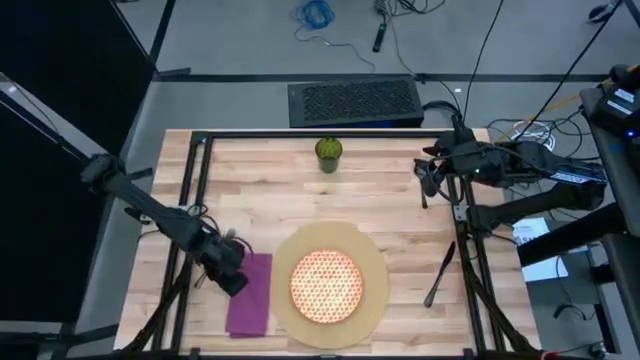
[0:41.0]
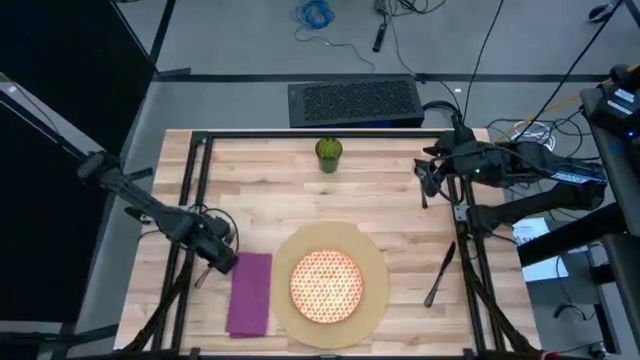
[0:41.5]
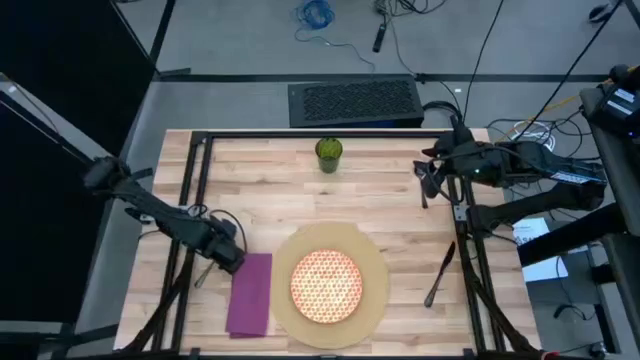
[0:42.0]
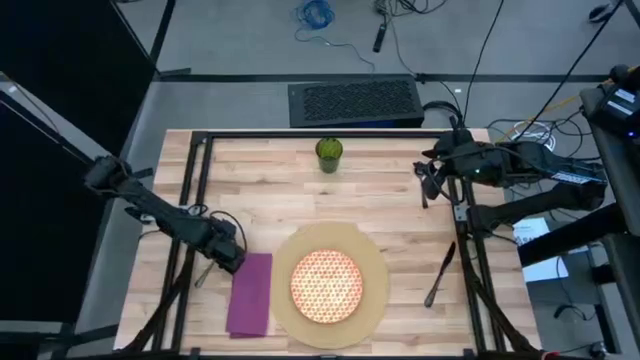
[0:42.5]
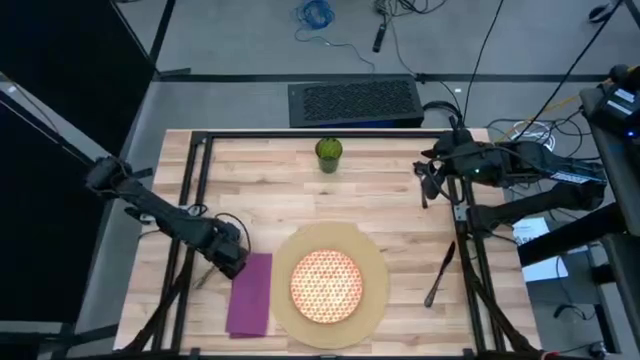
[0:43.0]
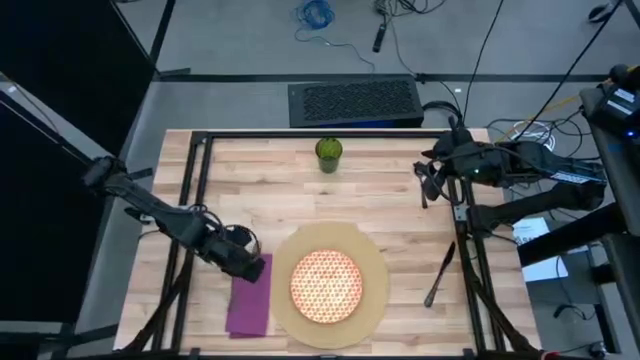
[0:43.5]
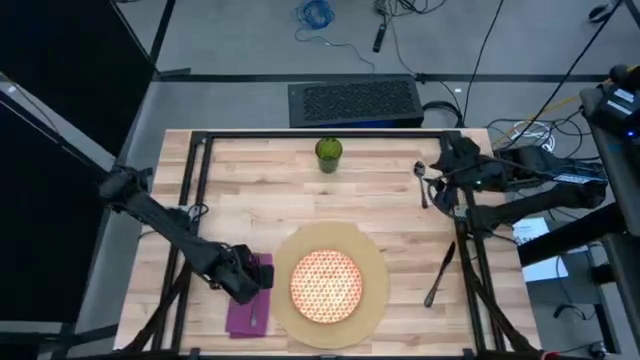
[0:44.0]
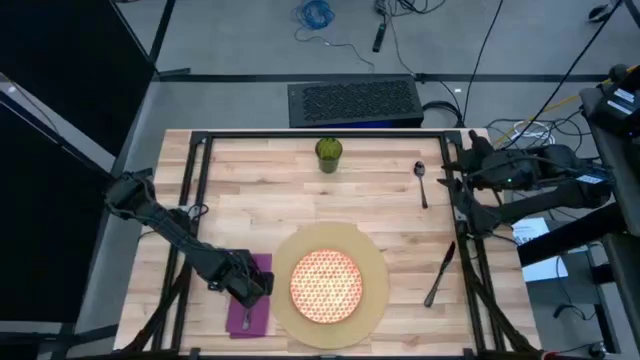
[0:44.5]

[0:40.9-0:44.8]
Task: Set table place
Put the black fork on top of the purple napkin

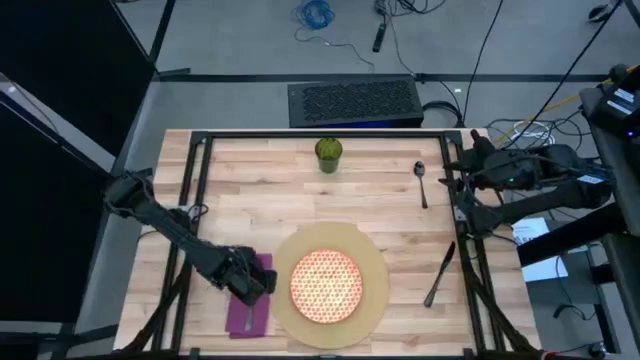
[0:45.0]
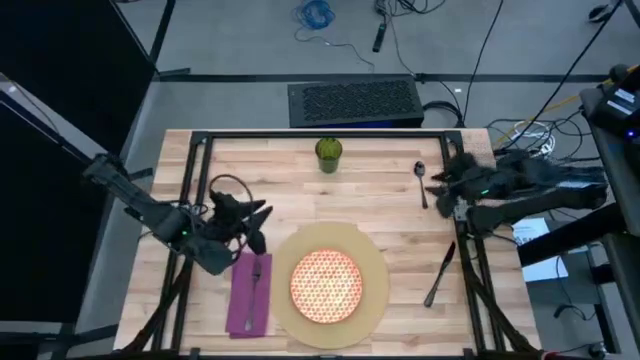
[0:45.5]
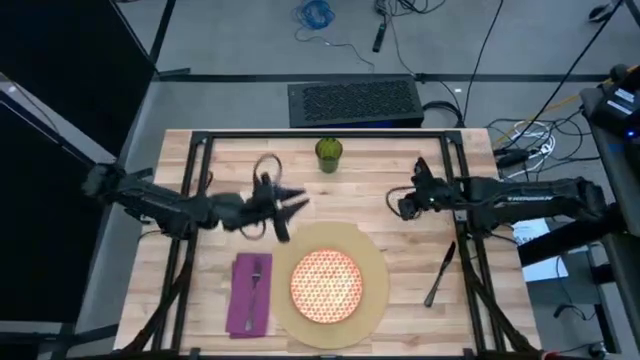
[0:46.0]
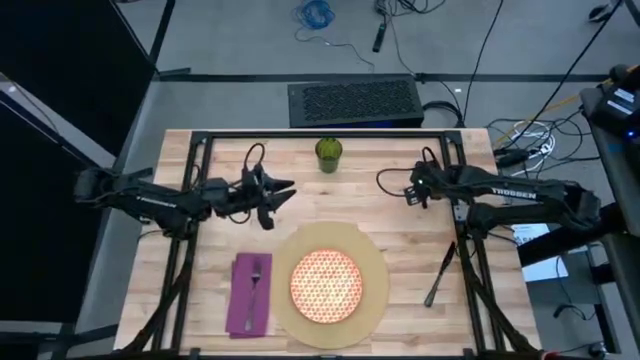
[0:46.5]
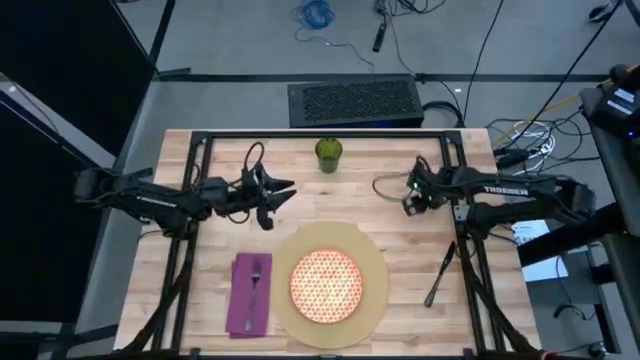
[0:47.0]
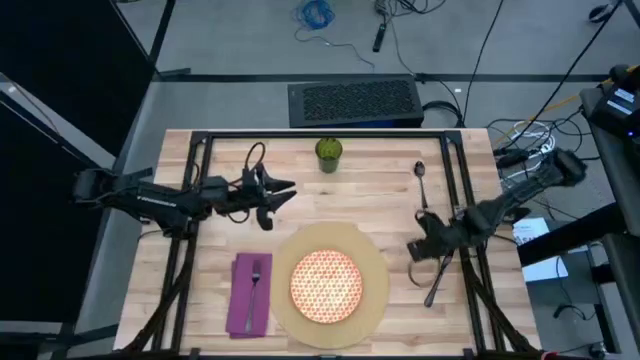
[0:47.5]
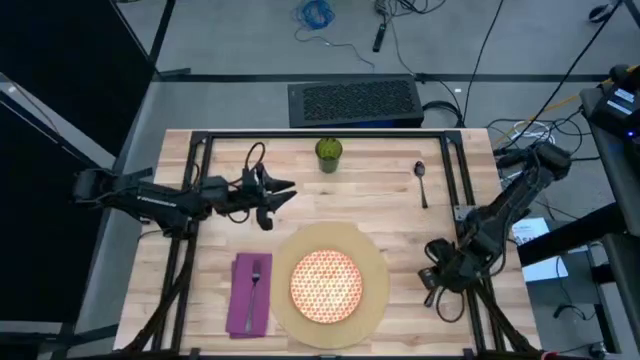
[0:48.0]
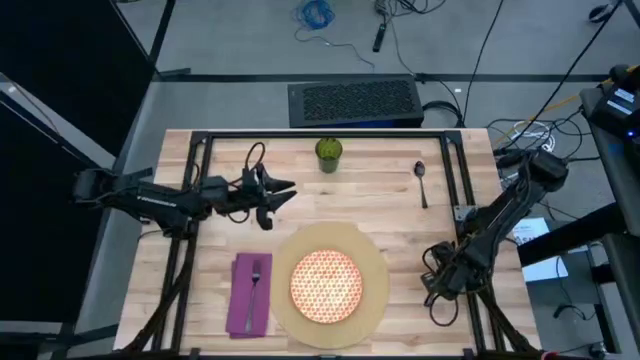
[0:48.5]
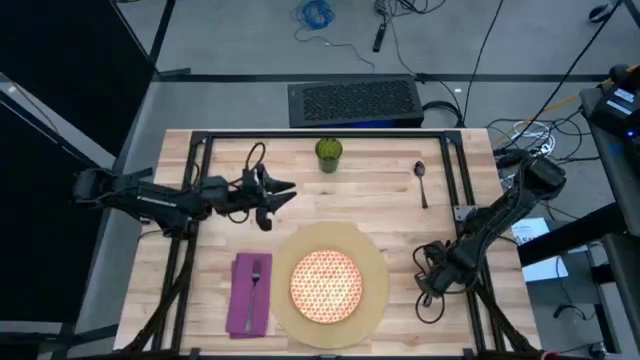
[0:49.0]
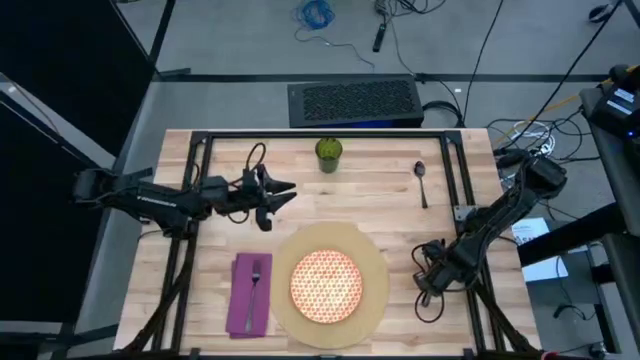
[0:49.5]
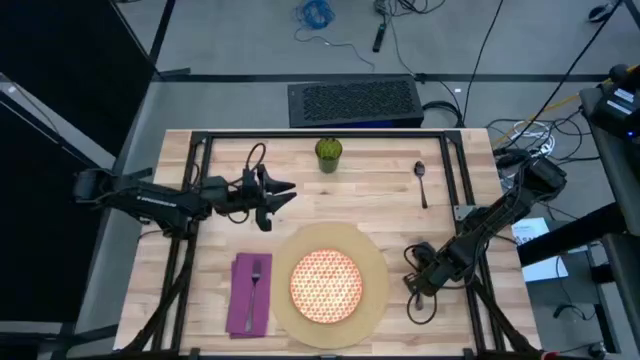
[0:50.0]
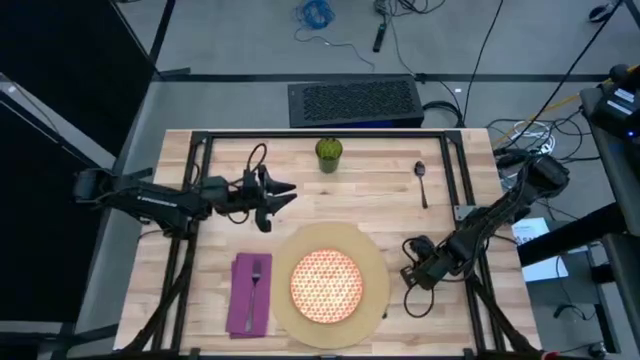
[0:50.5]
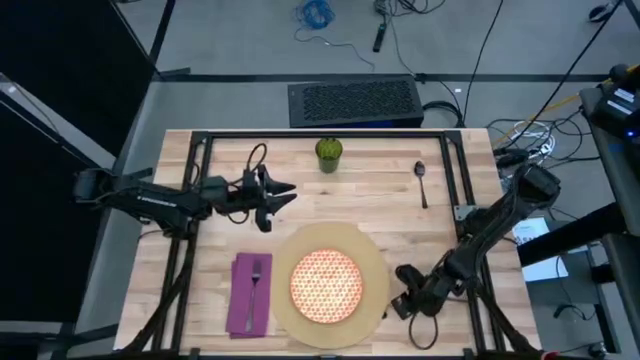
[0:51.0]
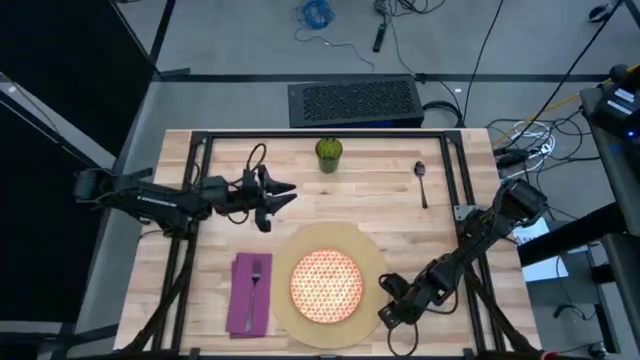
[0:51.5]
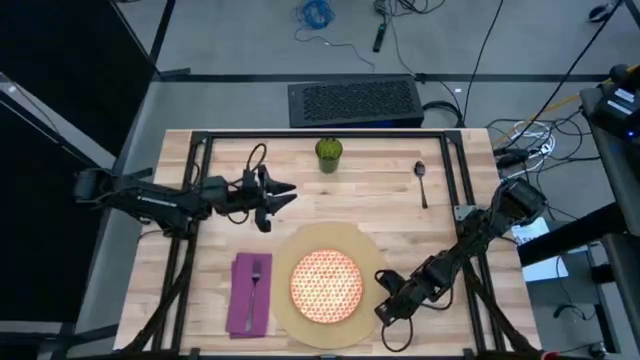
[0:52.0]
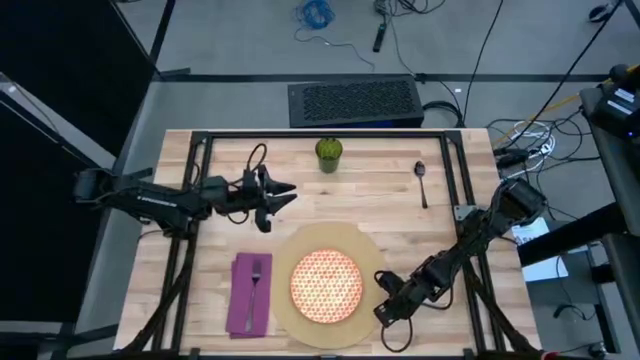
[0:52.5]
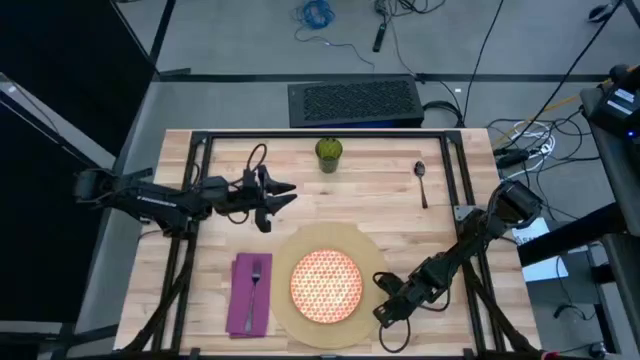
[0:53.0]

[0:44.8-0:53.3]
Move the black knife to the right of the brown placemat

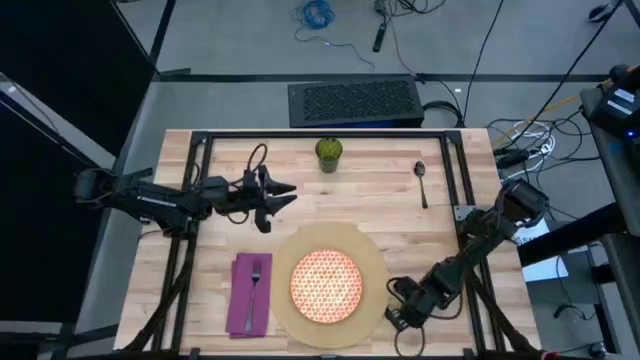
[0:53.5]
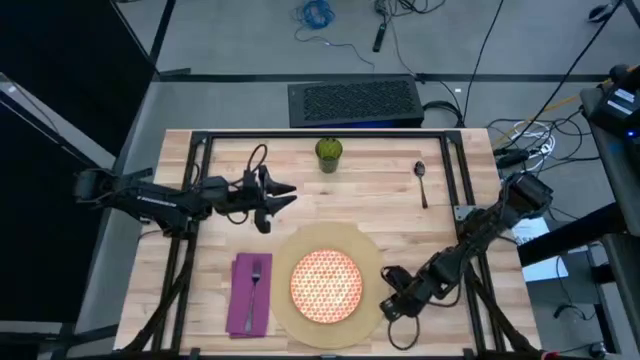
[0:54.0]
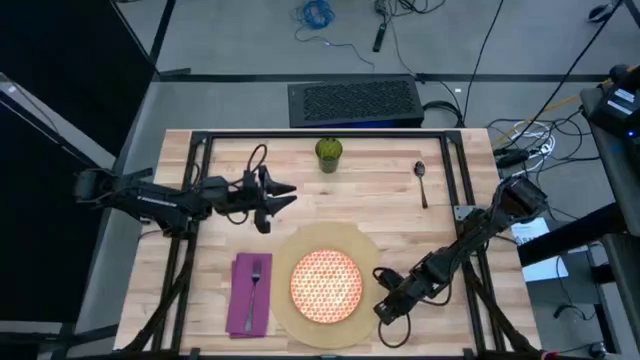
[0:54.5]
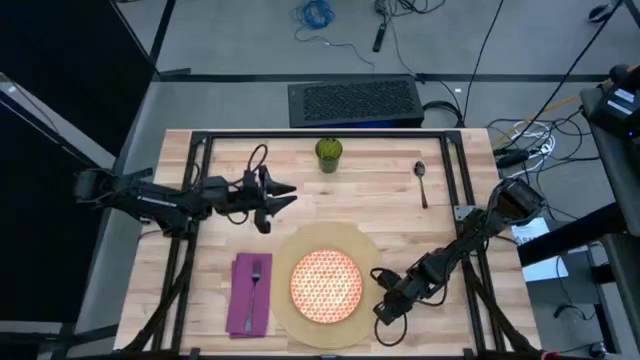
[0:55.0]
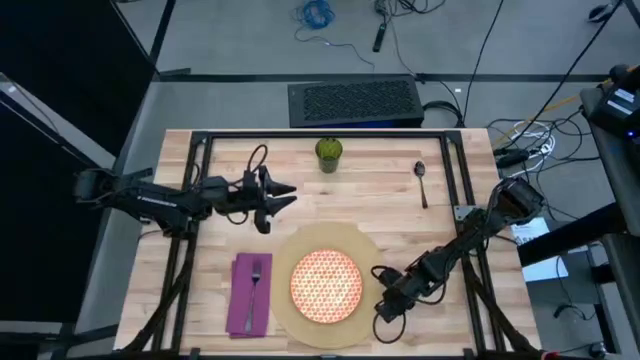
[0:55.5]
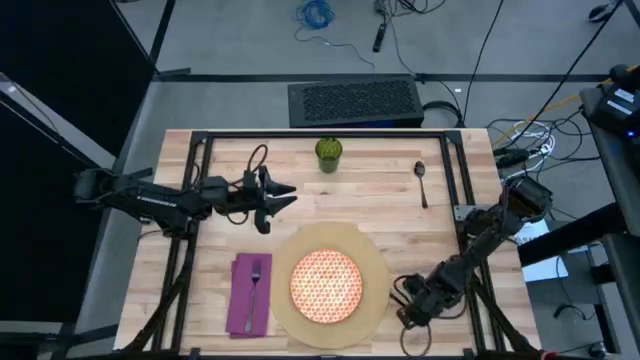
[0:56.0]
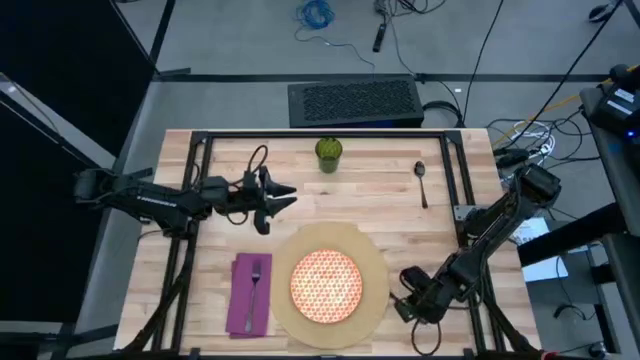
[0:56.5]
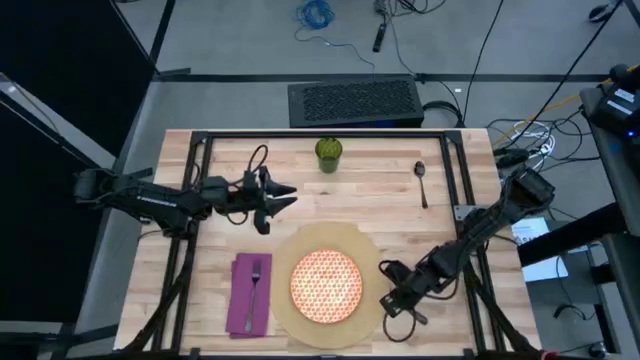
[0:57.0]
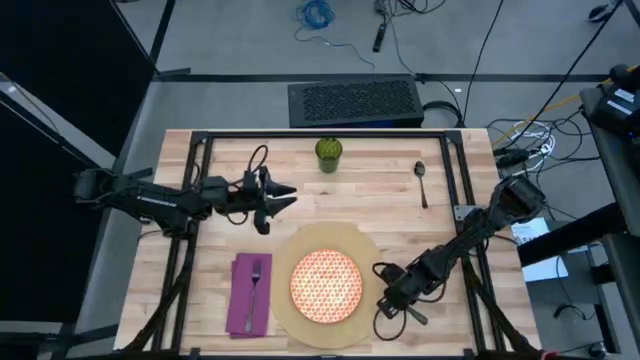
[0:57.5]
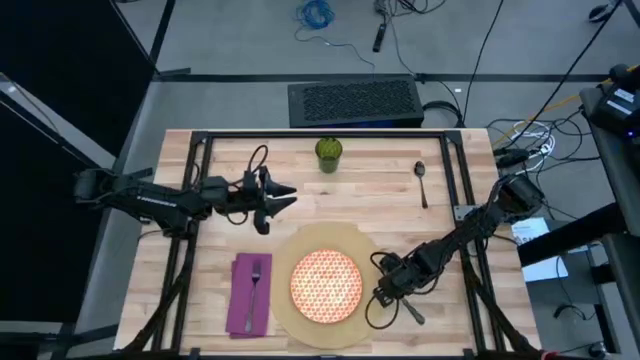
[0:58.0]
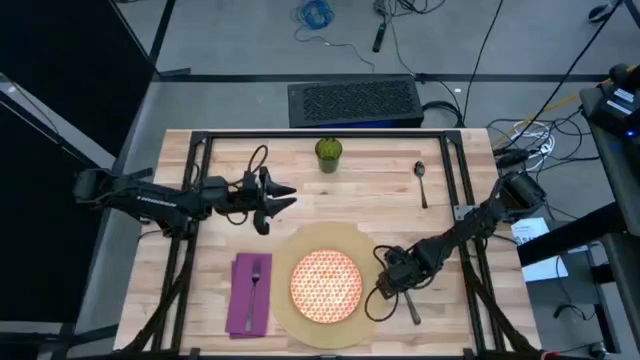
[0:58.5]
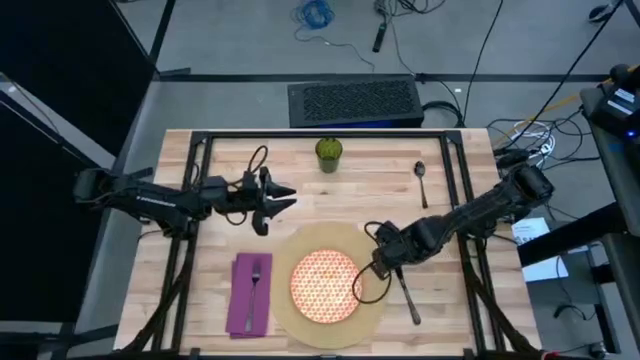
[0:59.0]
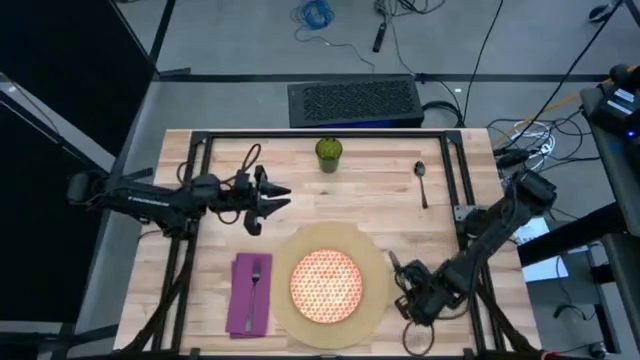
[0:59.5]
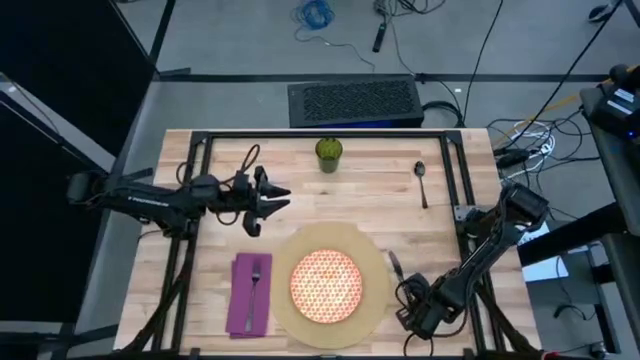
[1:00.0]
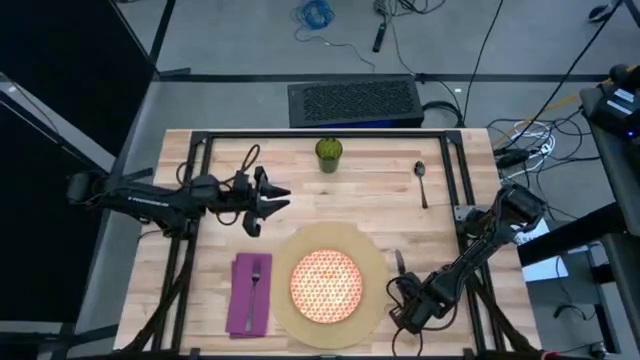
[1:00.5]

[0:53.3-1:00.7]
Move the black knife to the right of the brown placemat

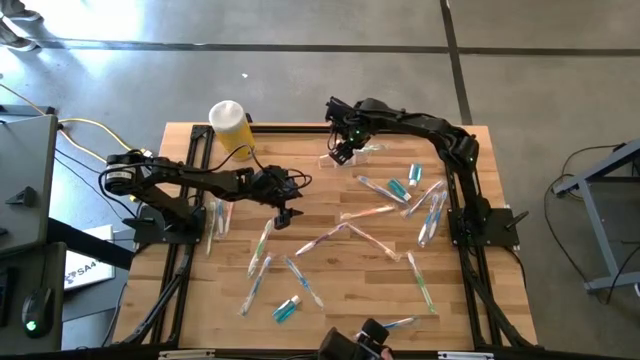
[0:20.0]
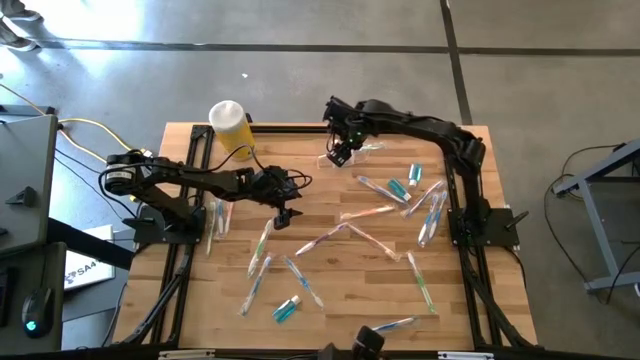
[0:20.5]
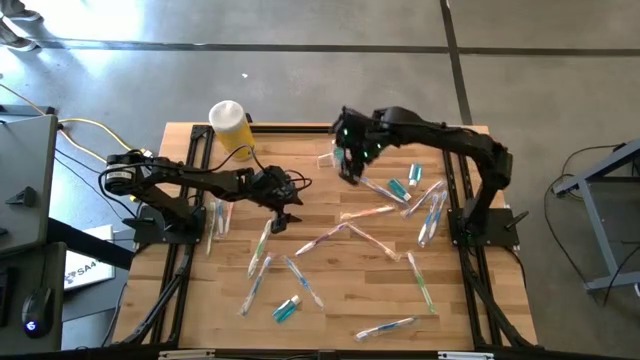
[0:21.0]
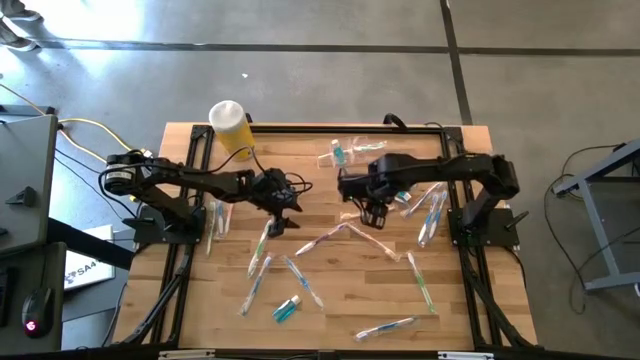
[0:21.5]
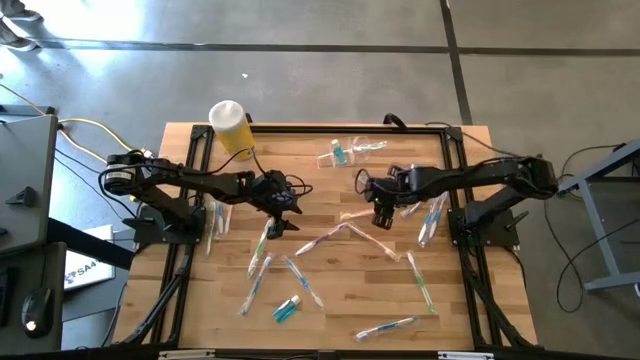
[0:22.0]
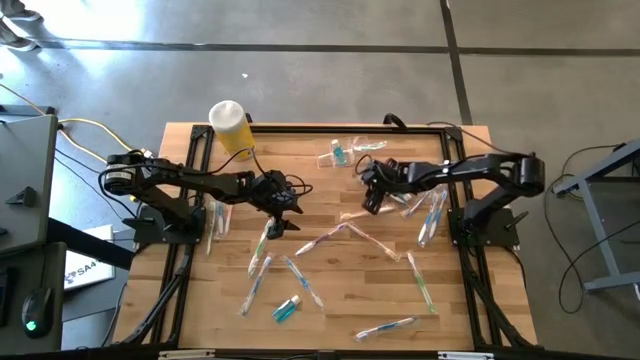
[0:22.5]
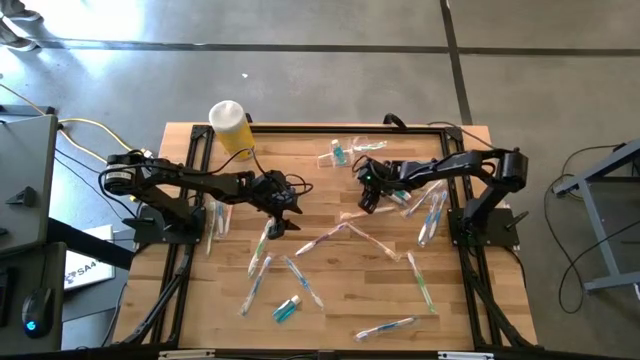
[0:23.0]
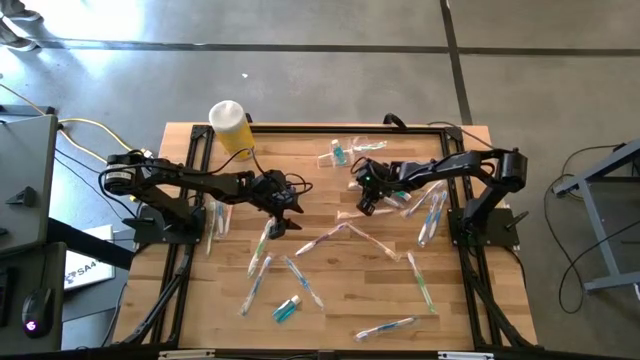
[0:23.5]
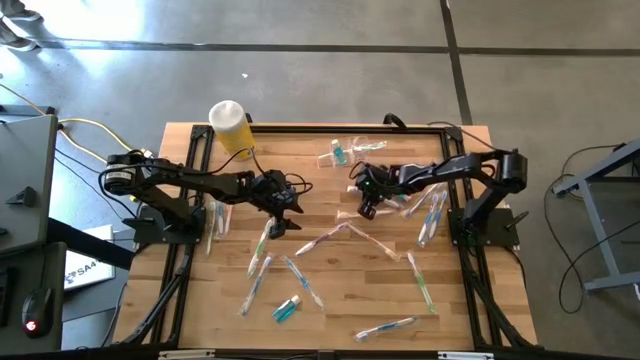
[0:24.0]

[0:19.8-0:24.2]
Task: Pick & Place toothbrushing station
Put the blue toothbrush into the transparent organizer
